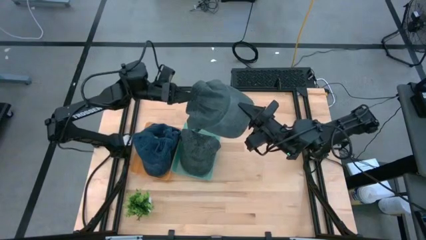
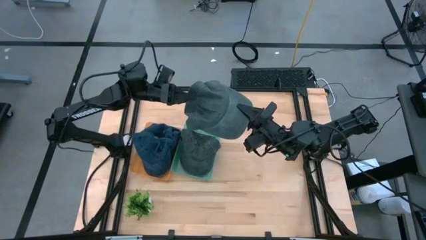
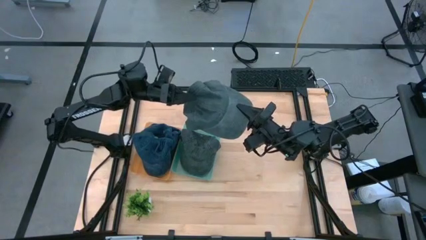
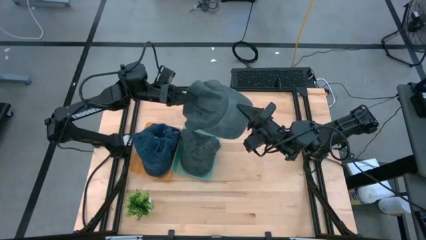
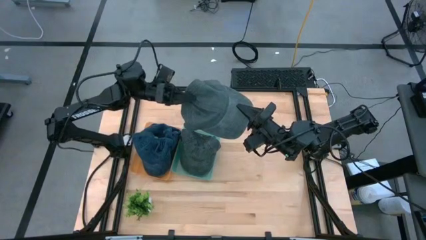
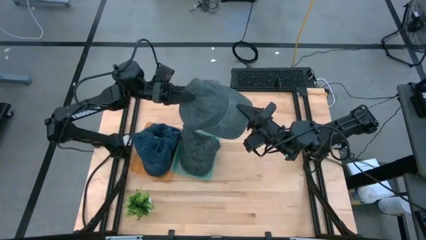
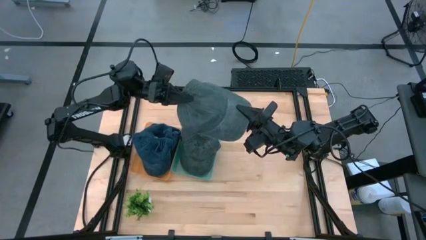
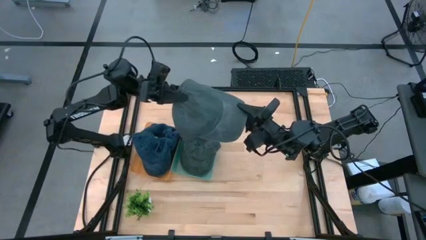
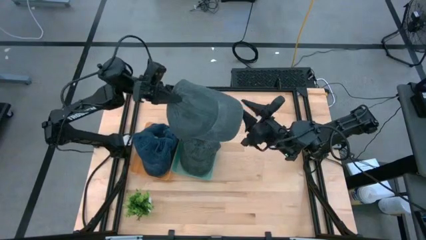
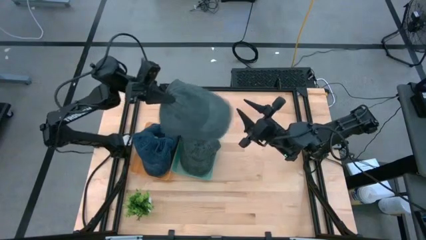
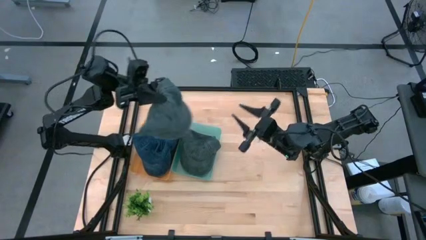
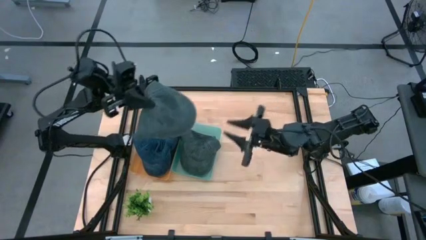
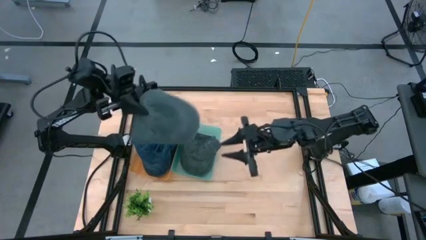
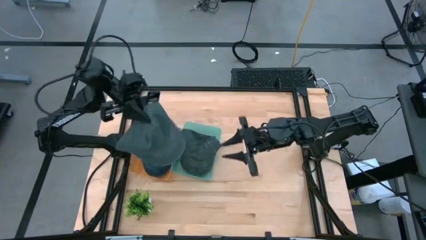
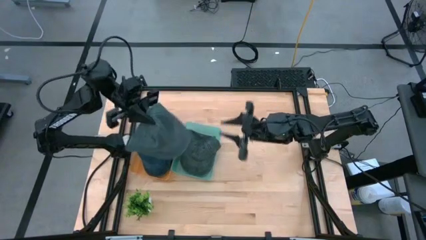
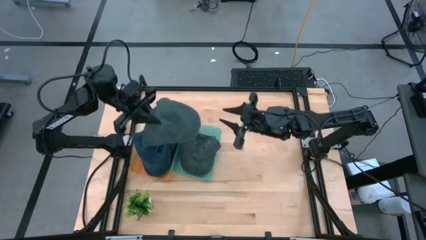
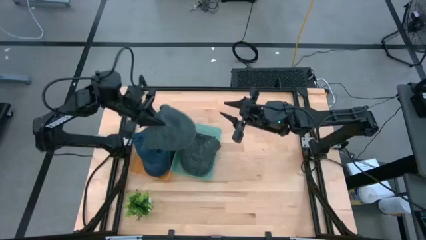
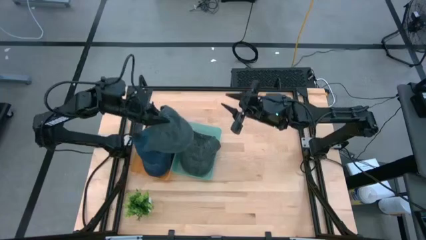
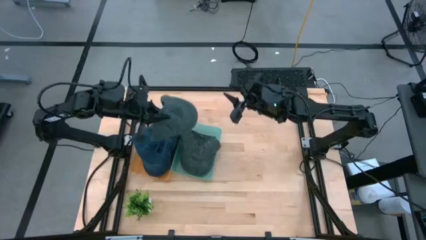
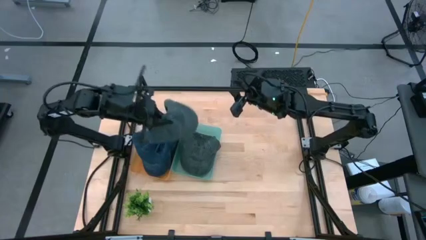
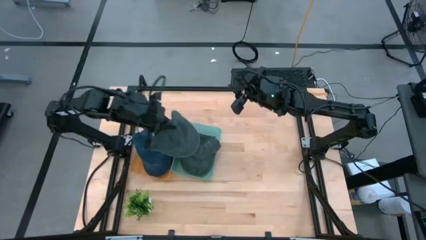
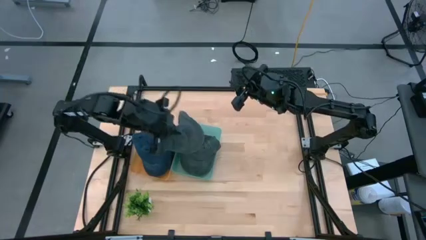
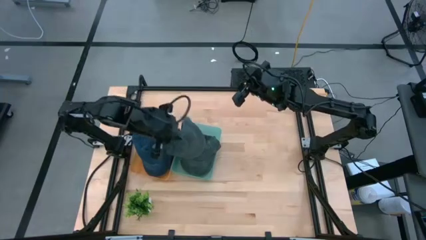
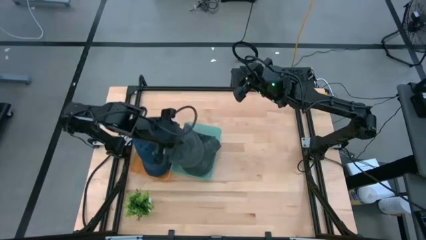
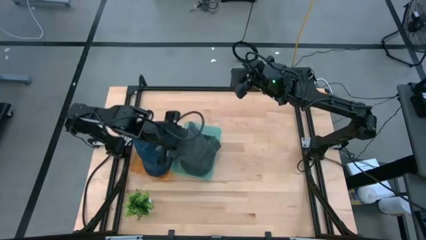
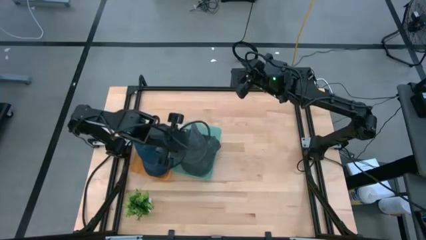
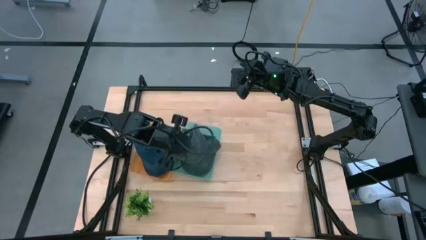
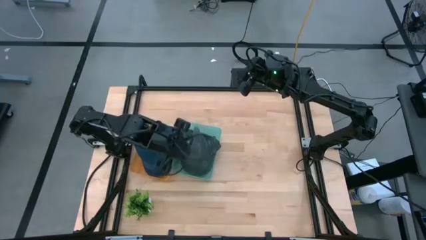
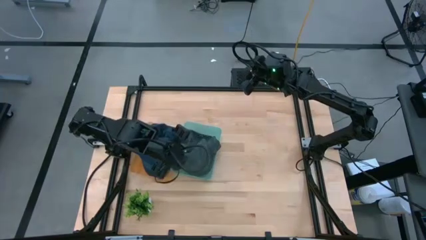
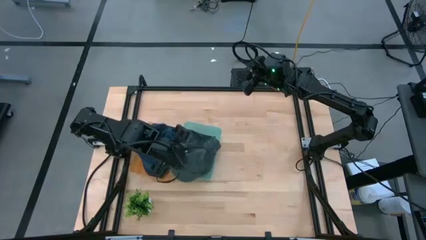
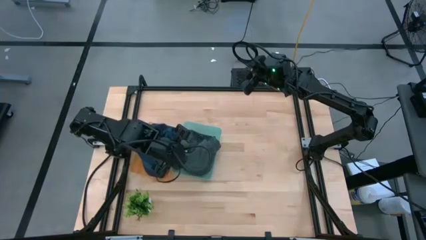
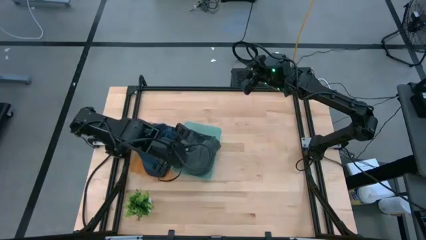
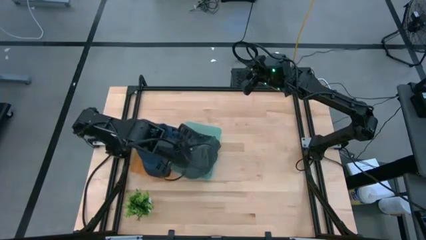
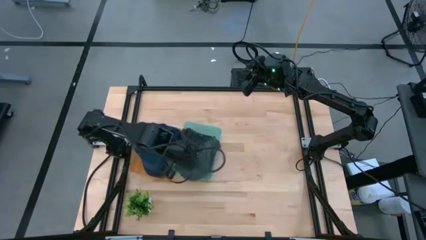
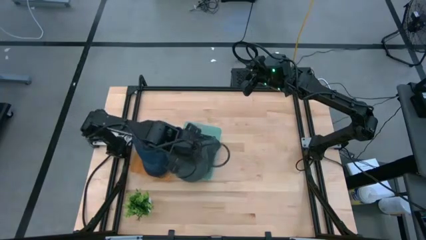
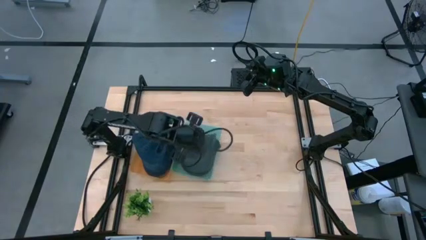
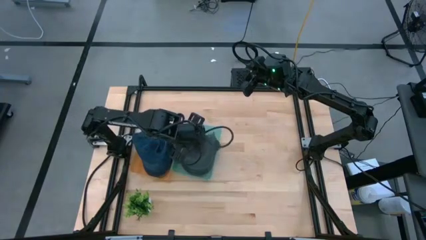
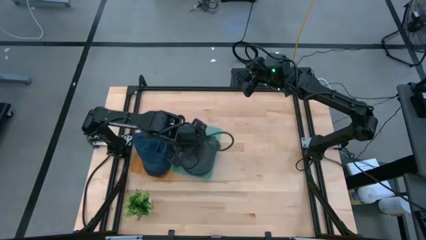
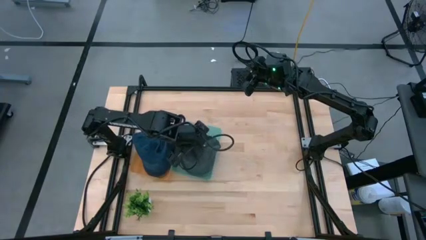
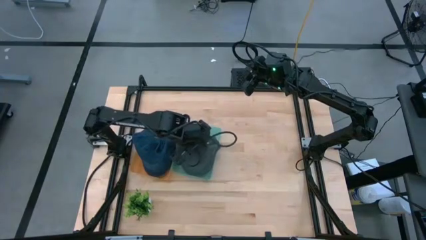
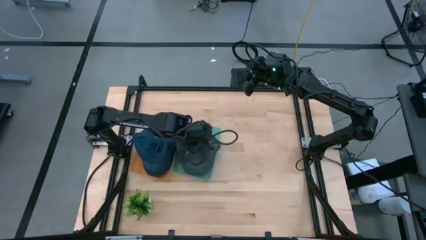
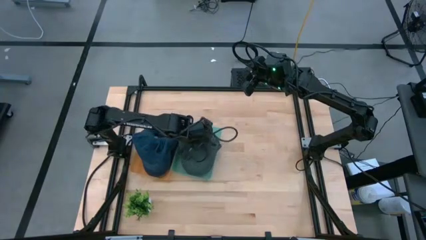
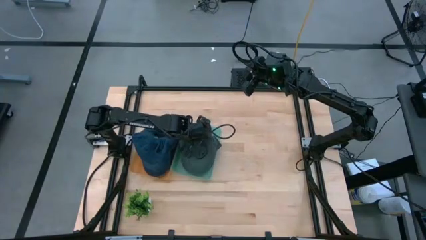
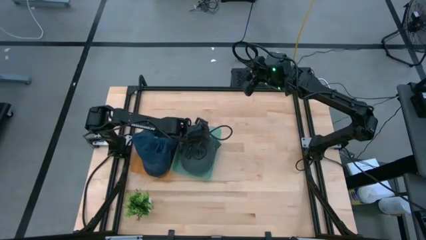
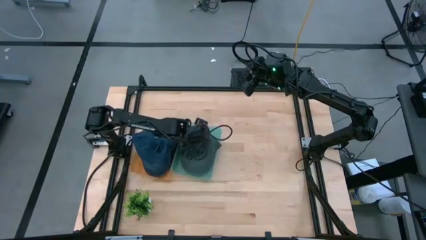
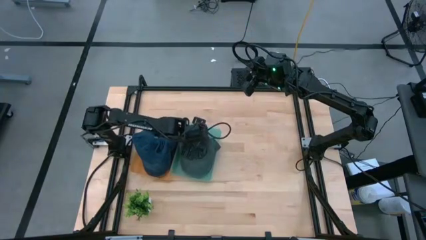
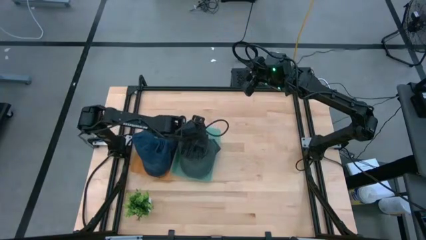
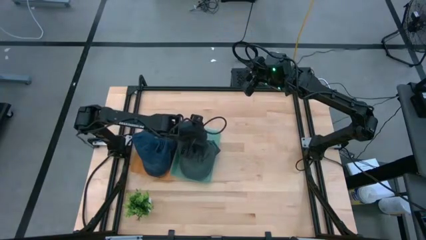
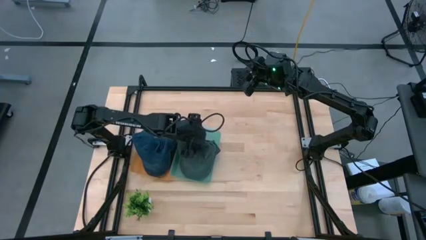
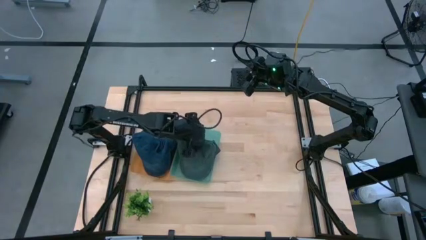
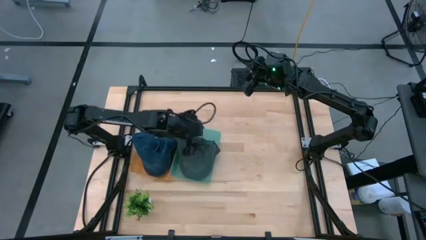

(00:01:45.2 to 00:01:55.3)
Task: Pick & Place hat
Put the black cap into the green bin
